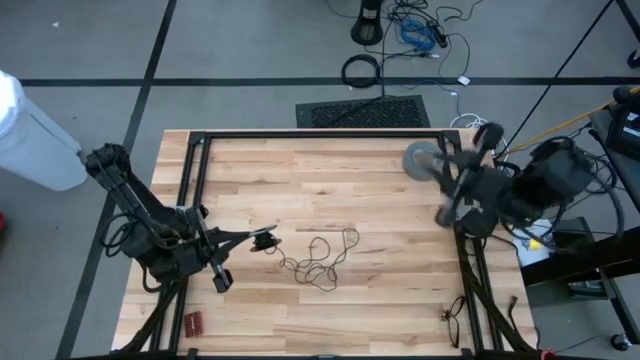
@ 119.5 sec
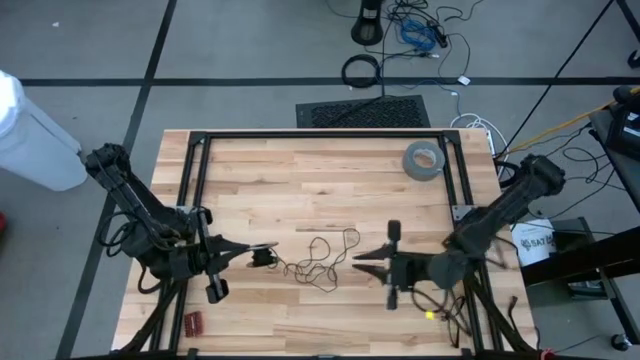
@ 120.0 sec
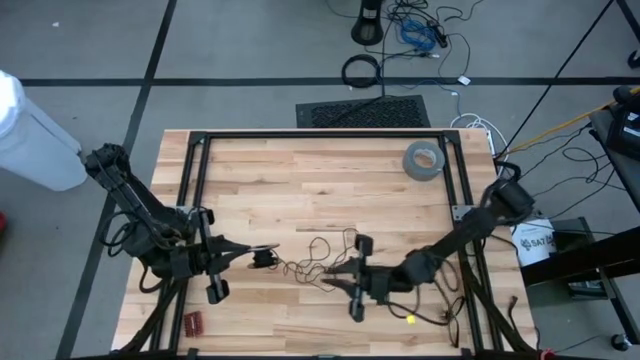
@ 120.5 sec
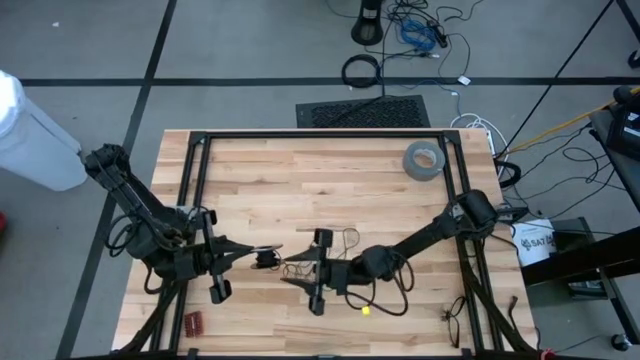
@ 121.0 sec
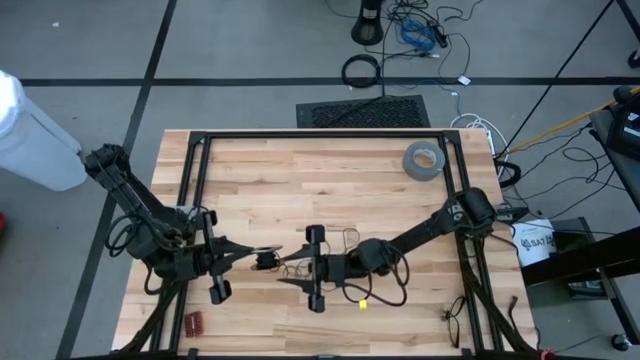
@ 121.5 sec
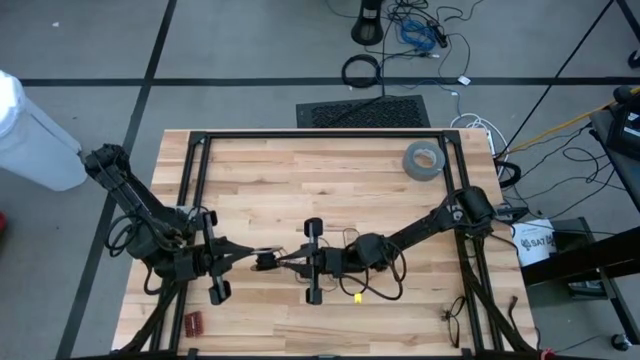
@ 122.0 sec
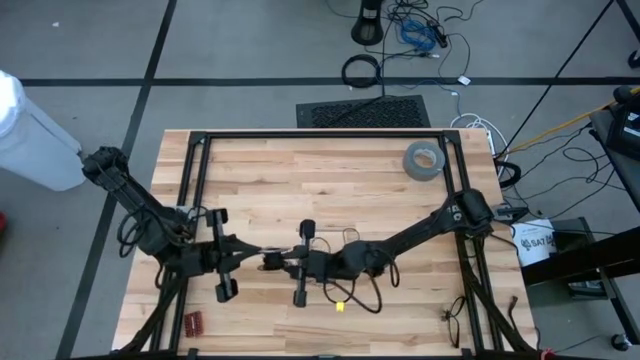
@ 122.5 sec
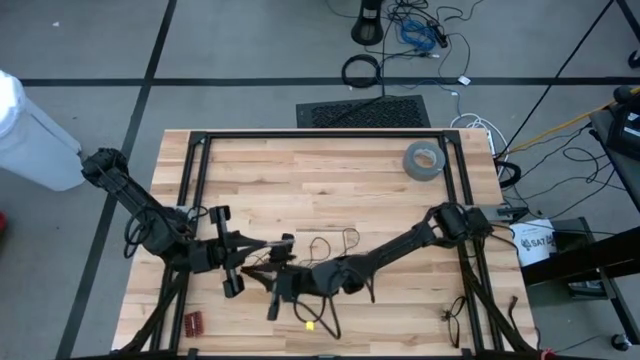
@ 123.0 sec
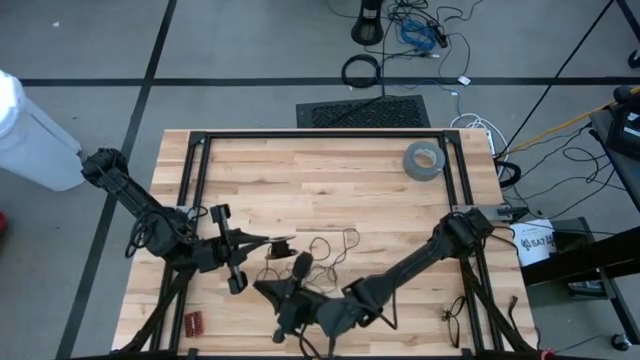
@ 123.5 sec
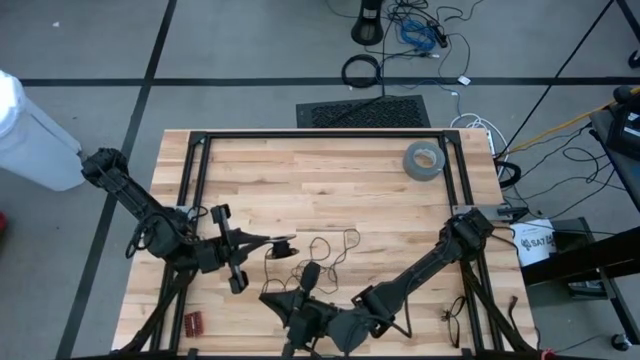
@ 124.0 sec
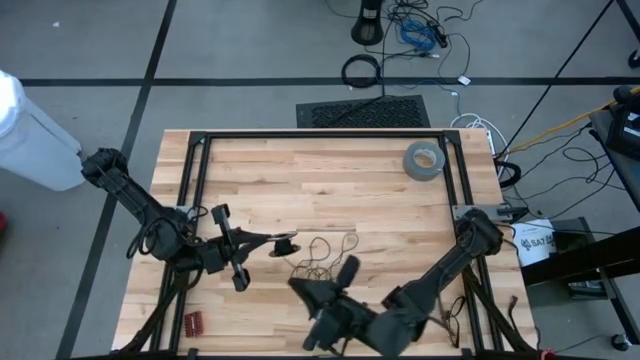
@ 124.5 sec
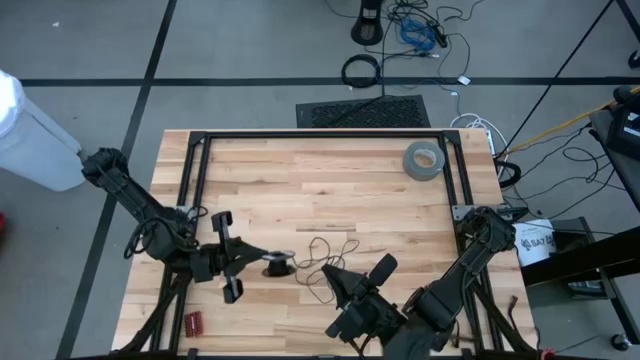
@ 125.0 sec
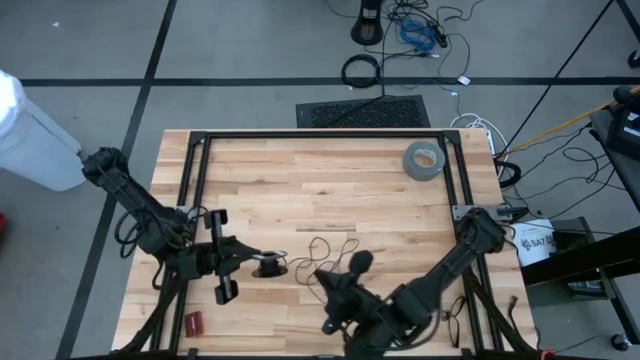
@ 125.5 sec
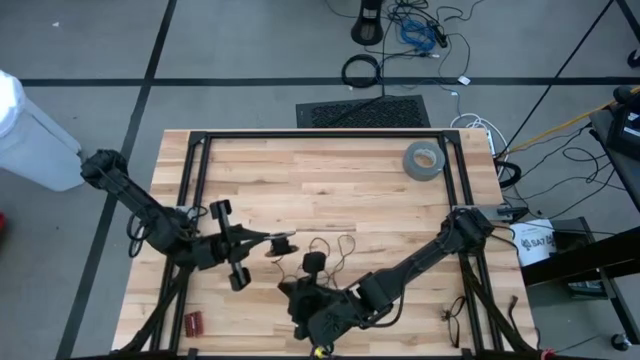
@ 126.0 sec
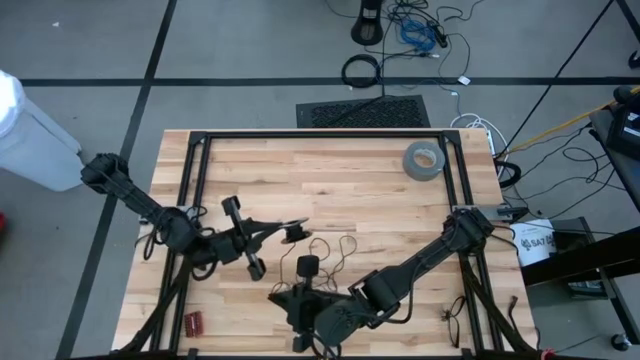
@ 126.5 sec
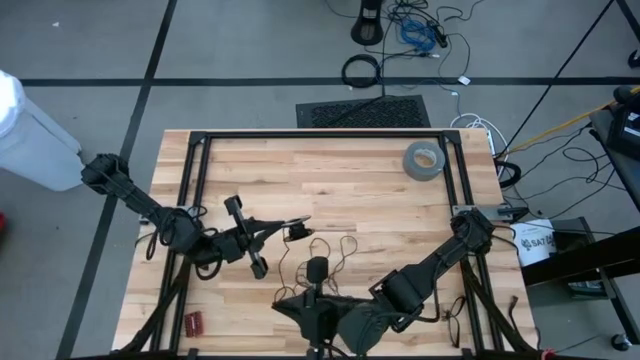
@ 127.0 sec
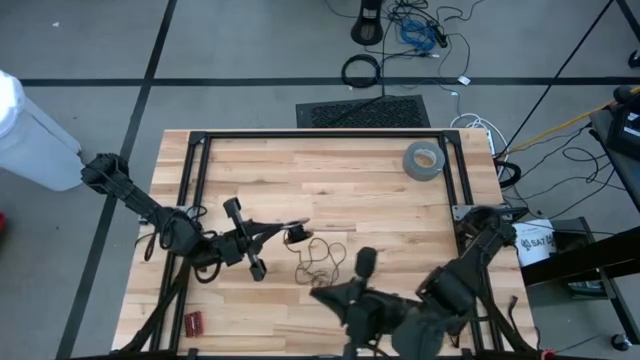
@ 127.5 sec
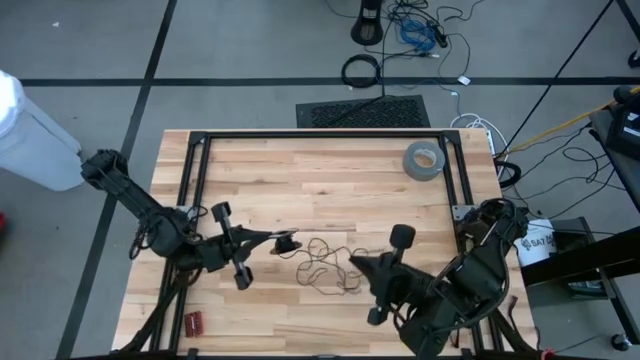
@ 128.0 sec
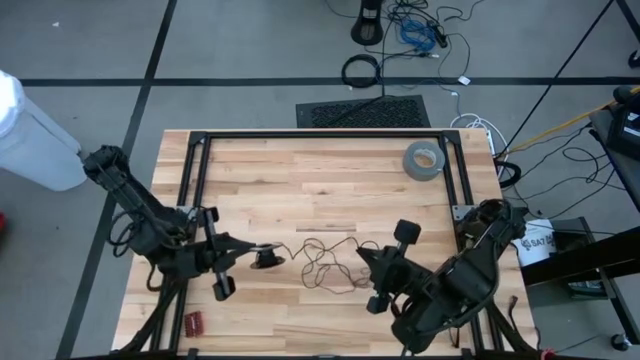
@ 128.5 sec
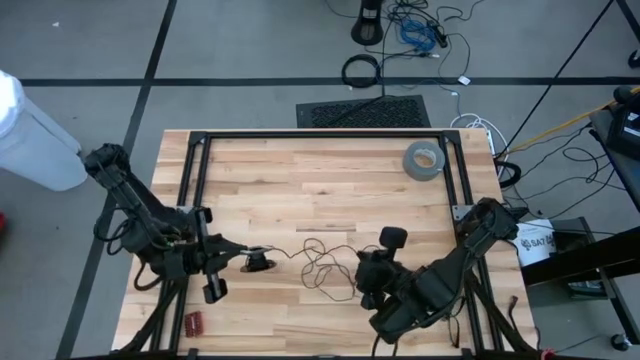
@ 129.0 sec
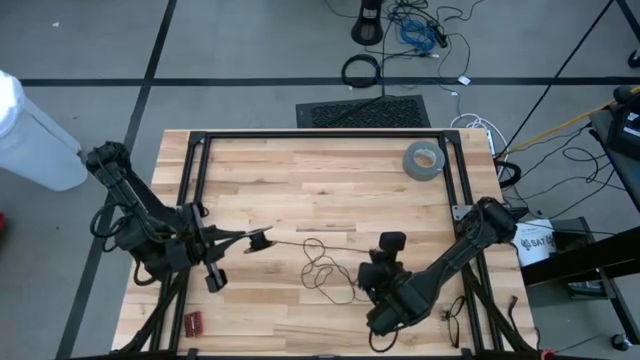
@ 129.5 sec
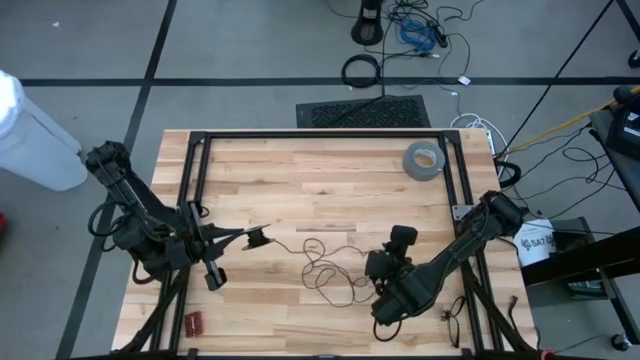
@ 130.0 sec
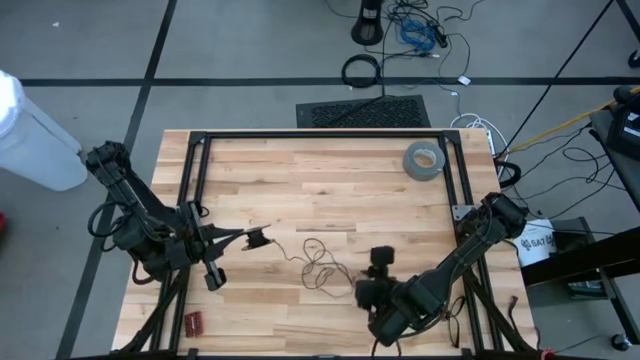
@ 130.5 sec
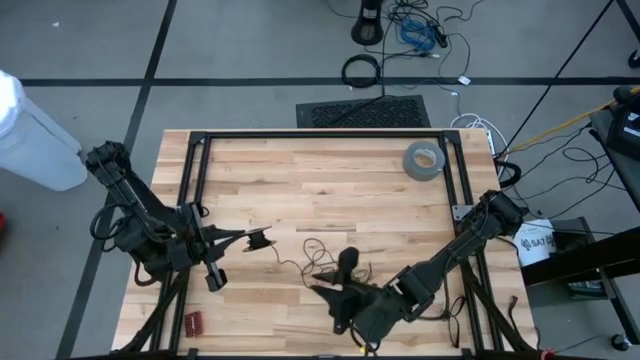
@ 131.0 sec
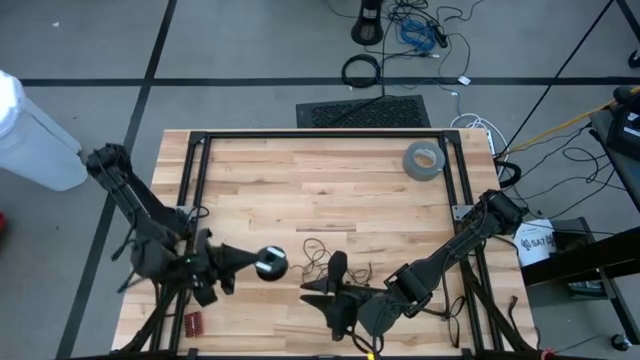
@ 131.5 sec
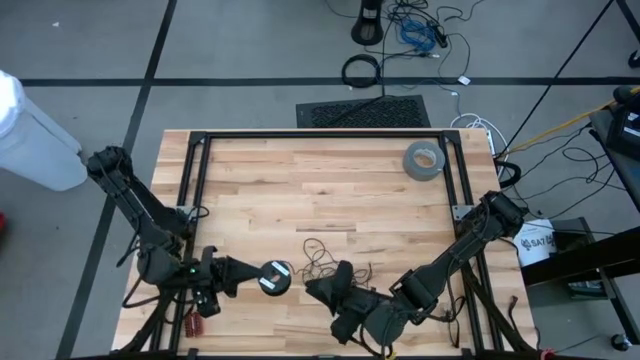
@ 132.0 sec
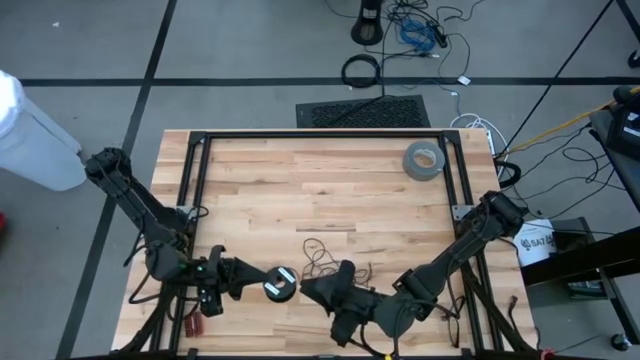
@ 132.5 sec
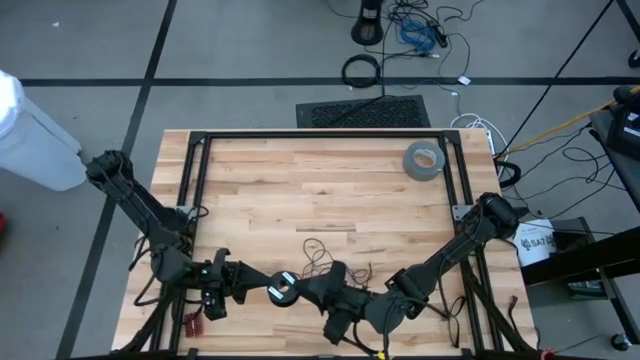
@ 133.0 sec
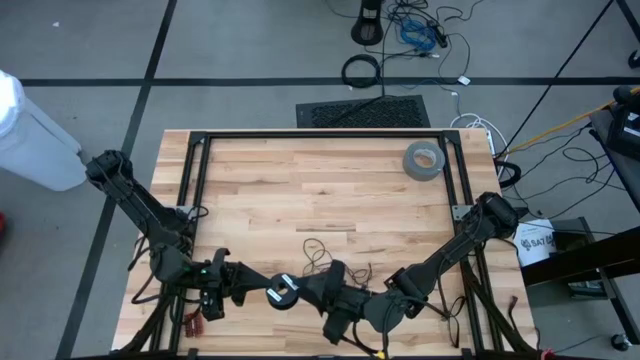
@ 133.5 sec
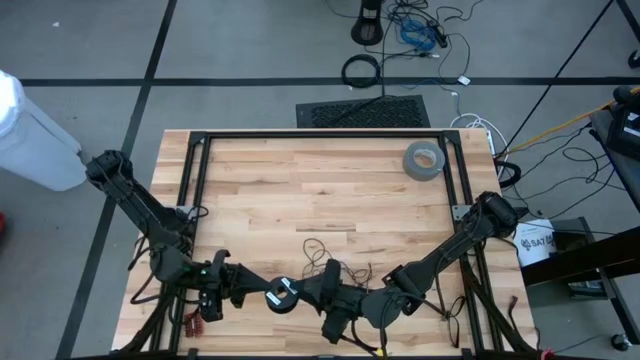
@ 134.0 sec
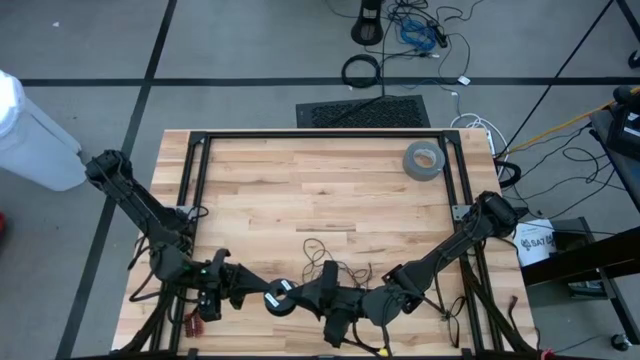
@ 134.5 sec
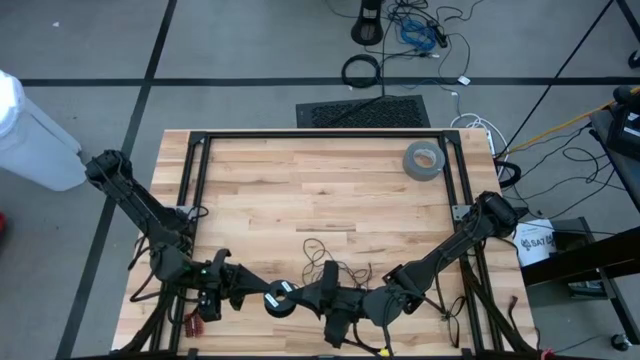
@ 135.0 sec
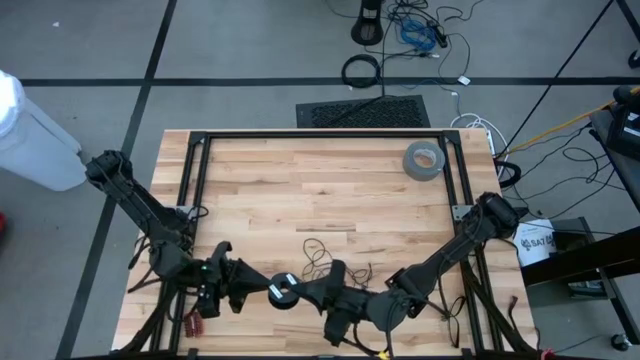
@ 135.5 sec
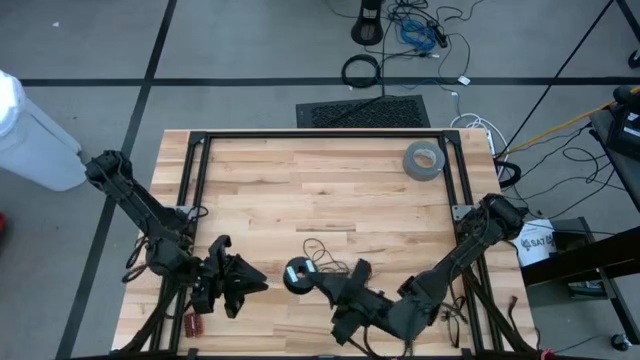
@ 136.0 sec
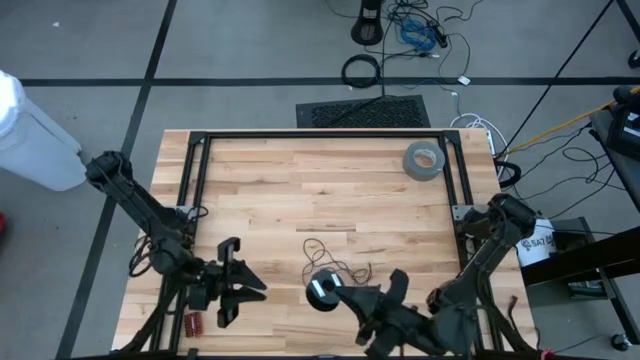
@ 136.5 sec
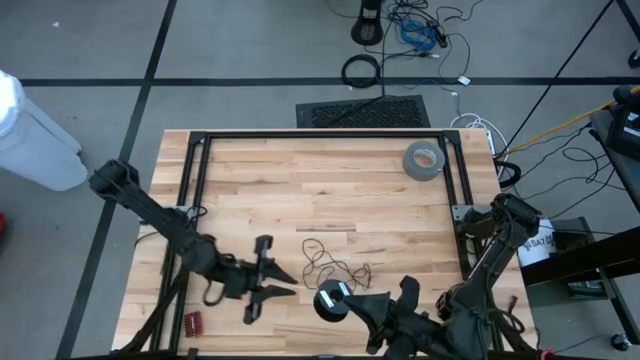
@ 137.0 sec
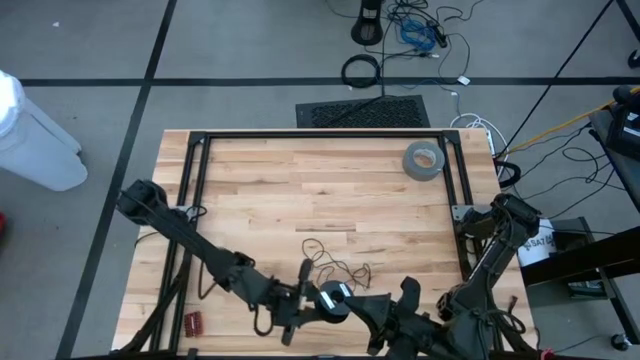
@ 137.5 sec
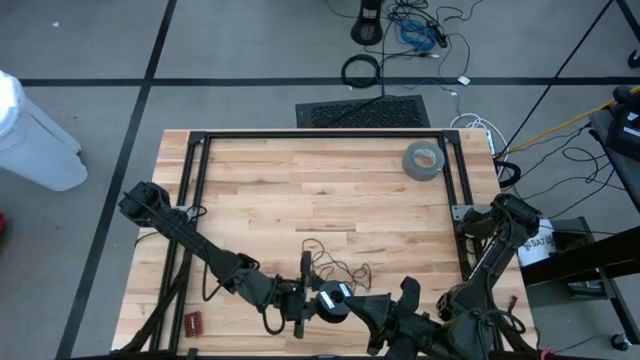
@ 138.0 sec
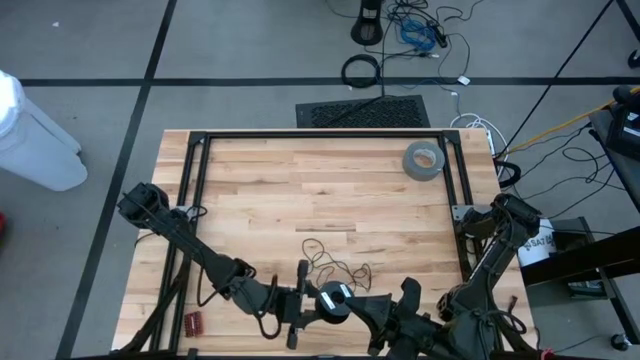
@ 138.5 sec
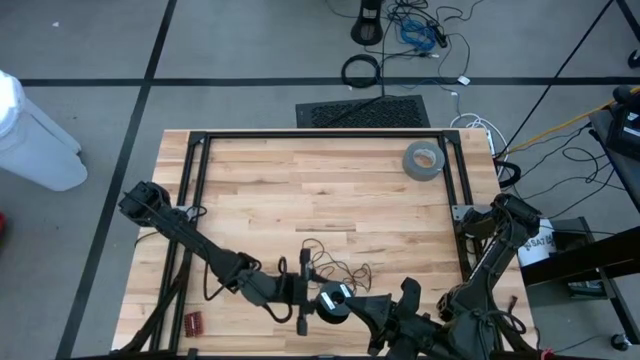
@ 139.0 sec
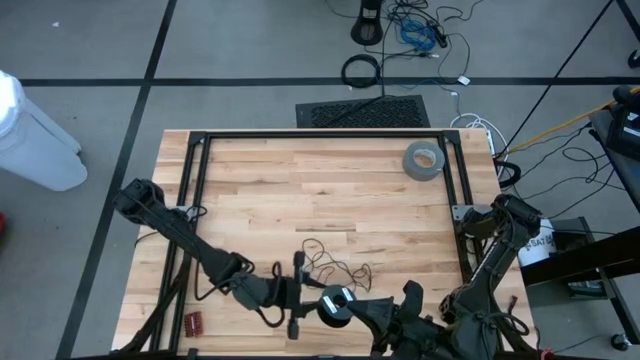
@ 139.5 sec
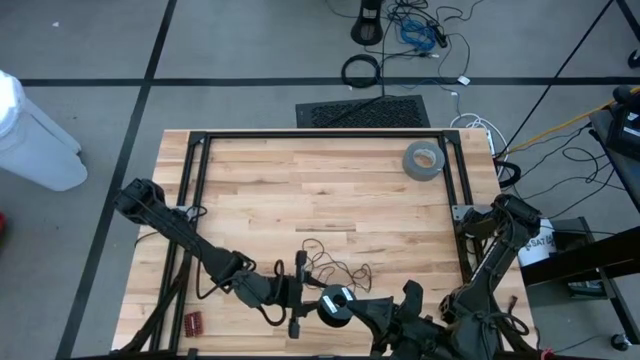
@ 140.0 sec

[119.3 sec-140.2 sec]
Task: Coil cords
Uncoil the black wire from the spool
